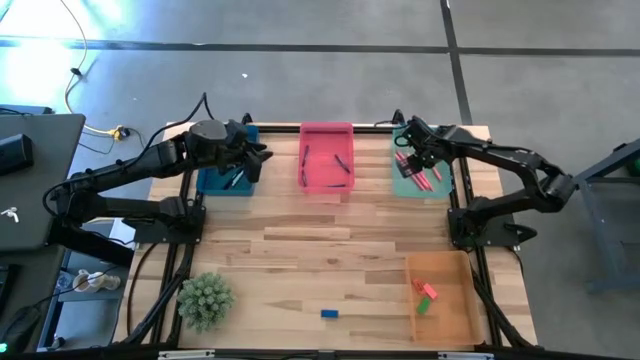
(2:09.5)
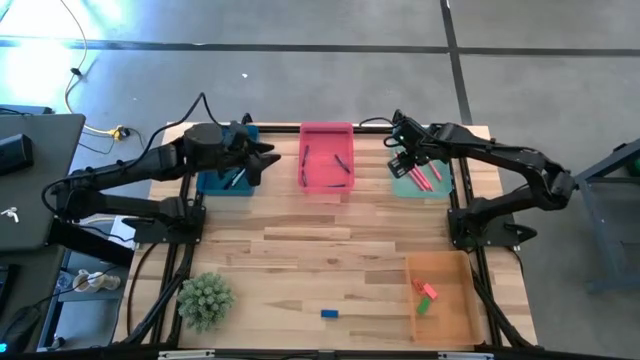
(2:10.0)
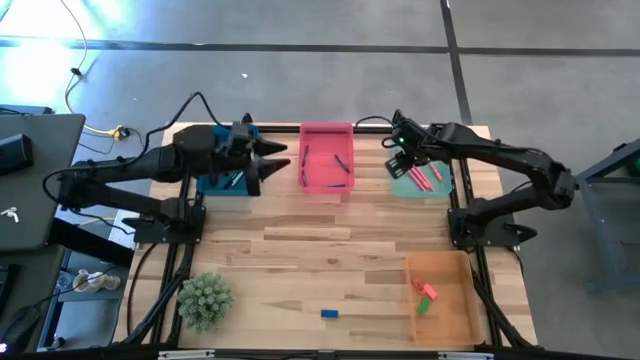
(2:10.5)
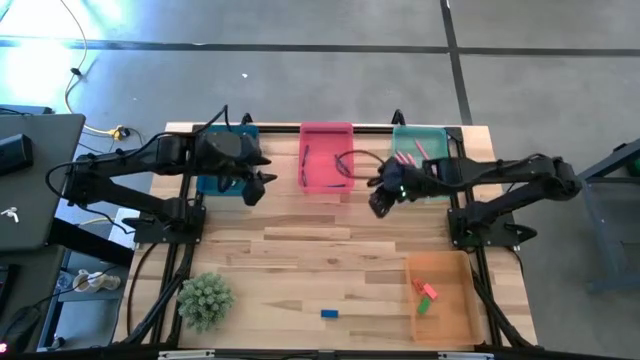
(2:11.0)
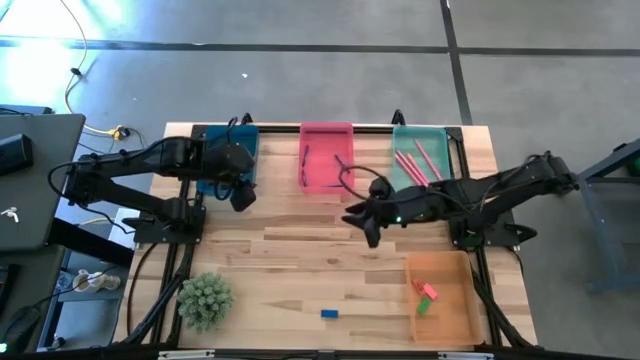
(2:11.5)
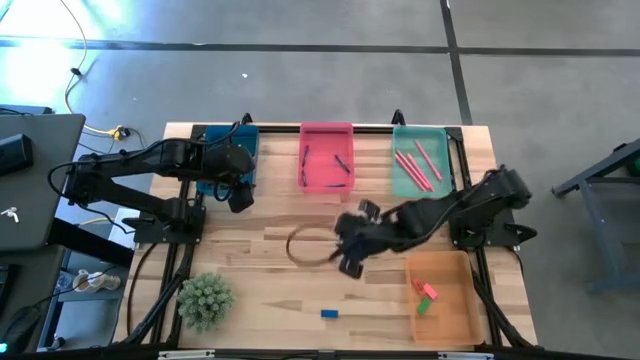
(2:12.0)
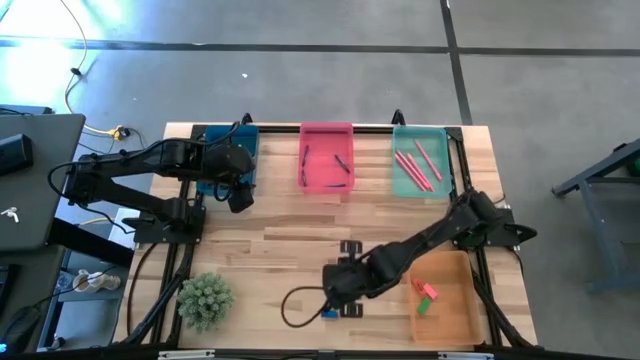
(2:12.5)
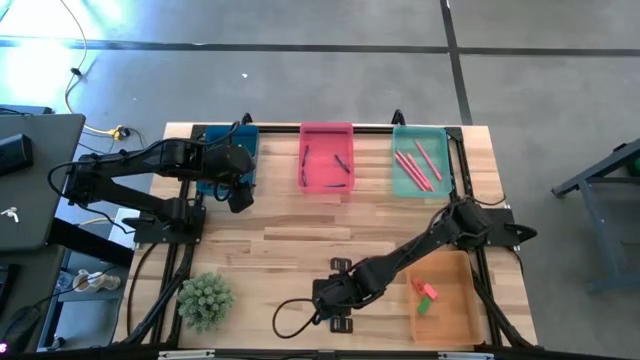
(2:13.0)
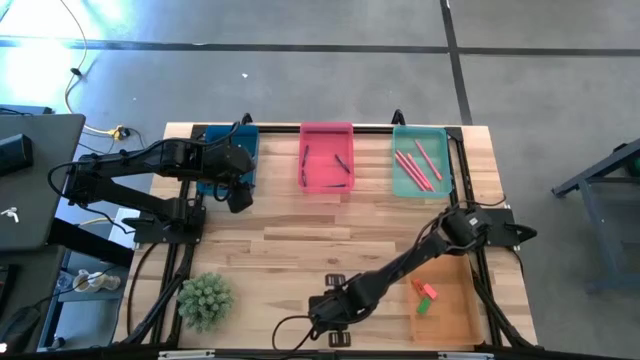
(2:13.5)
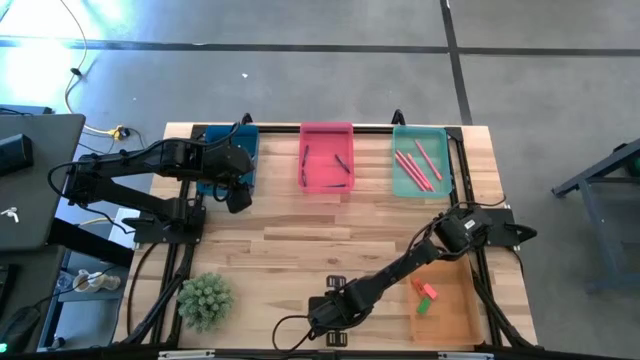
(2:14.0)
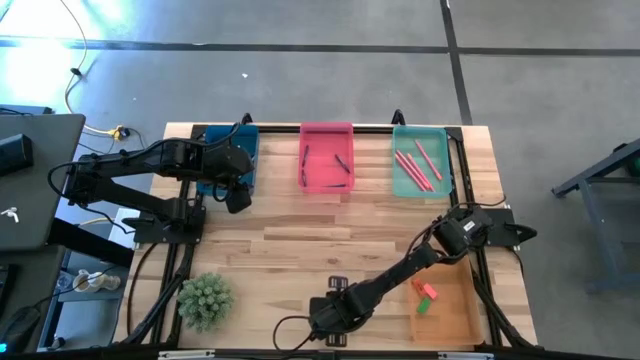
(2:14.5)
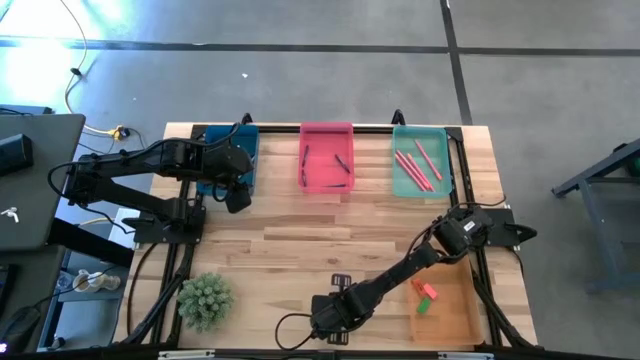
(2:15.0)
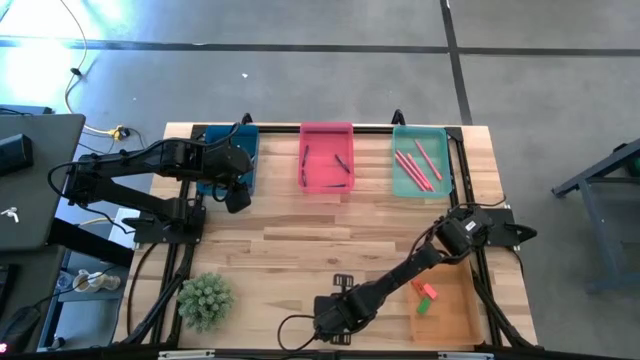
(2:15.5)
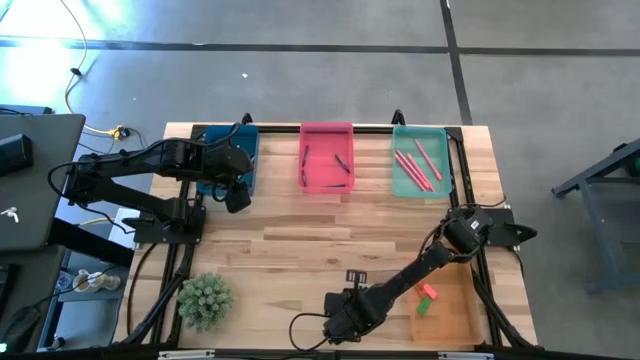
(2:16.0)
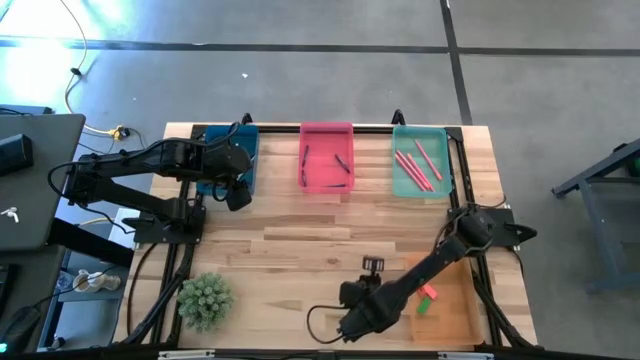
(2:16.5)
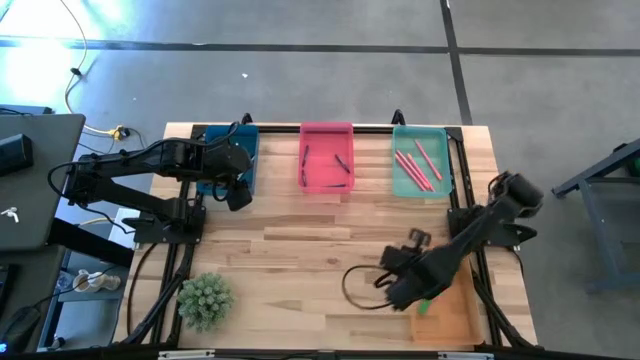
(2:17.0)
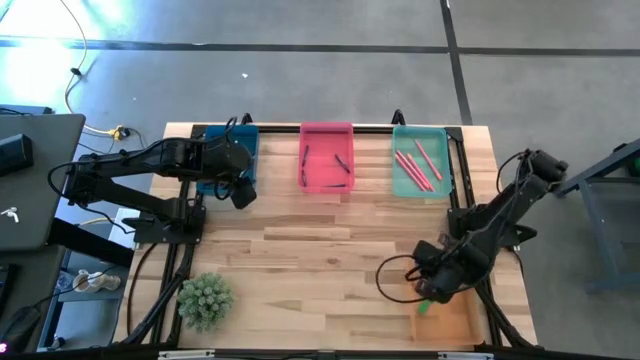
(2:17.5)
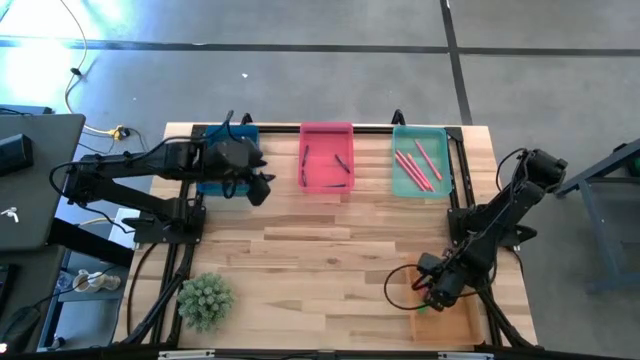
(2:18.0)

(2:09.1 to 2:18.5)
Task: Sort crayons/erasers/pens/pencils in bins
Put the blue eraser into the orange bin

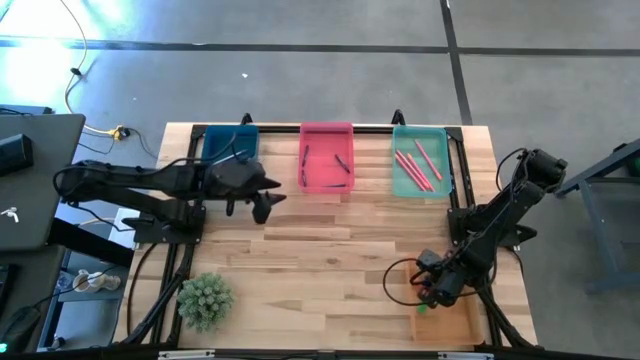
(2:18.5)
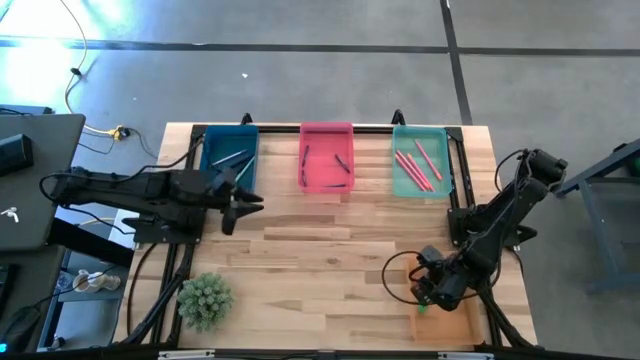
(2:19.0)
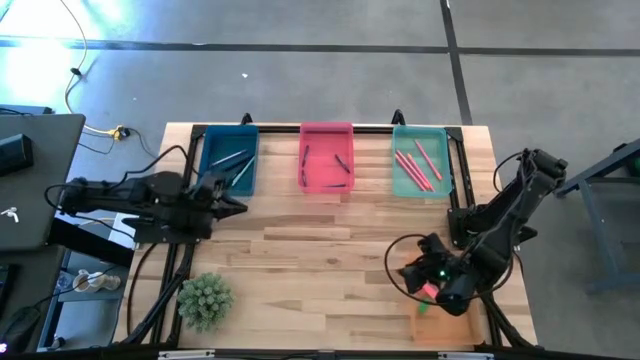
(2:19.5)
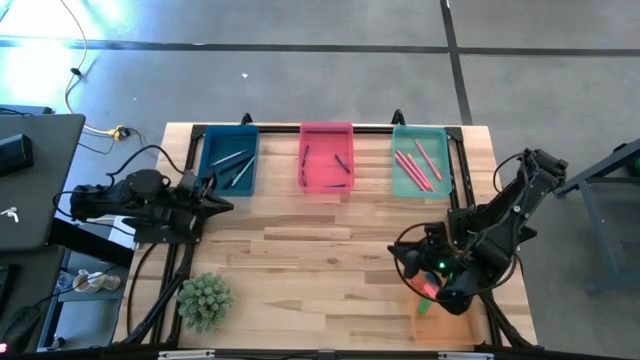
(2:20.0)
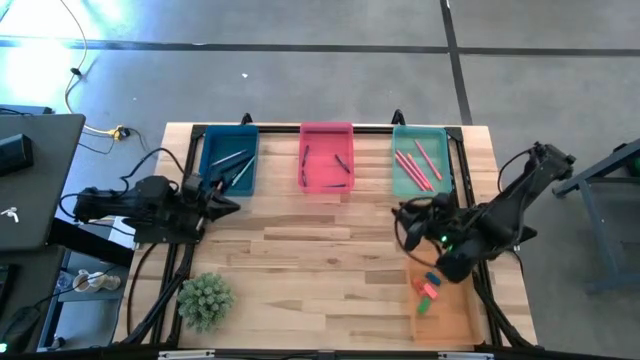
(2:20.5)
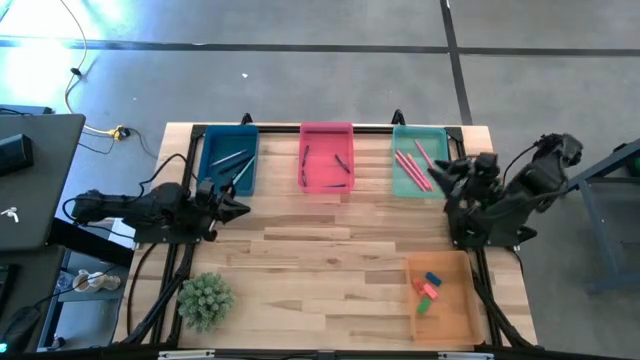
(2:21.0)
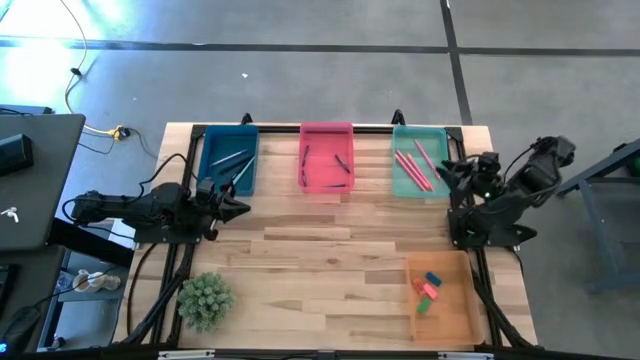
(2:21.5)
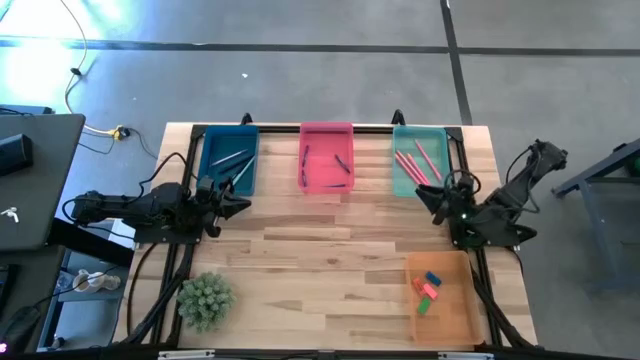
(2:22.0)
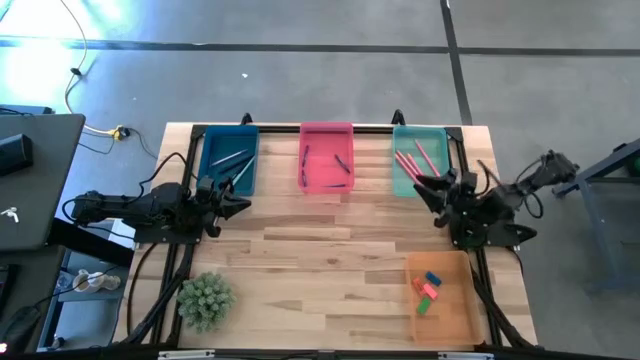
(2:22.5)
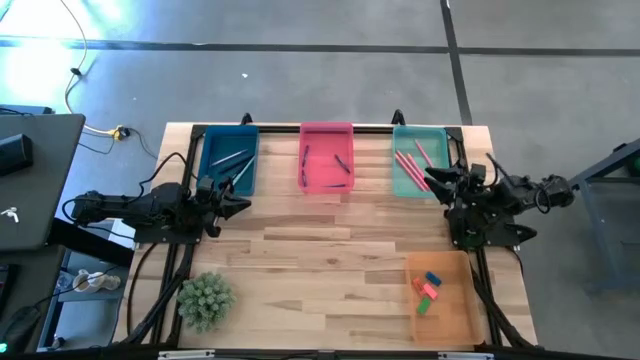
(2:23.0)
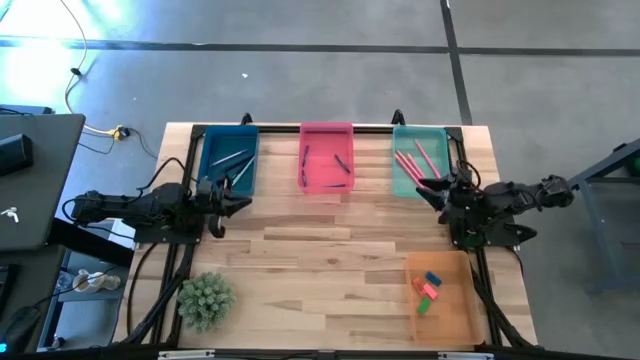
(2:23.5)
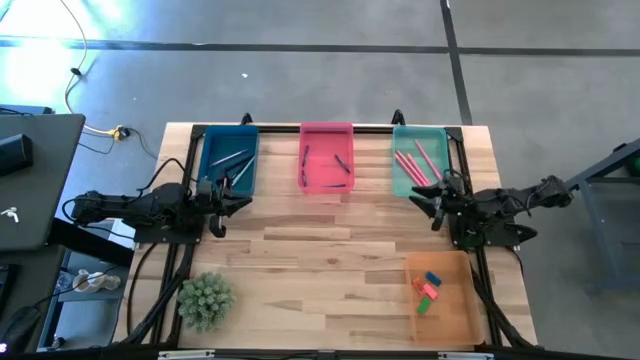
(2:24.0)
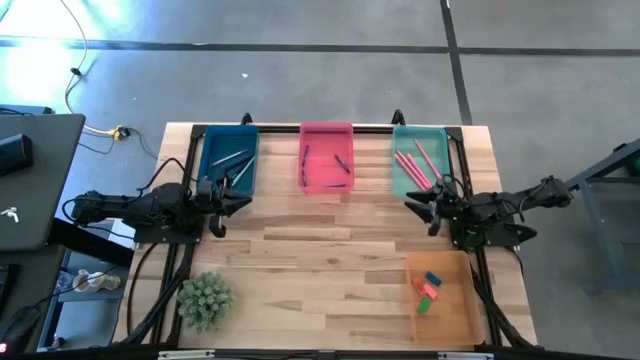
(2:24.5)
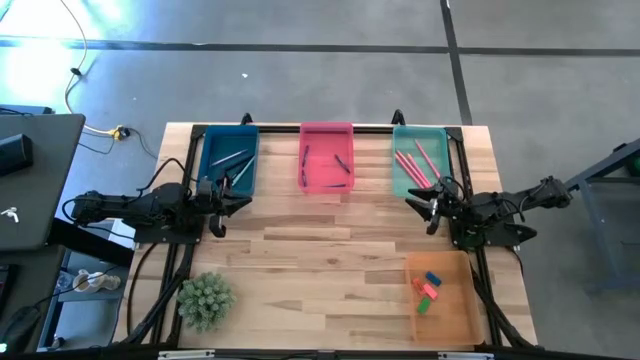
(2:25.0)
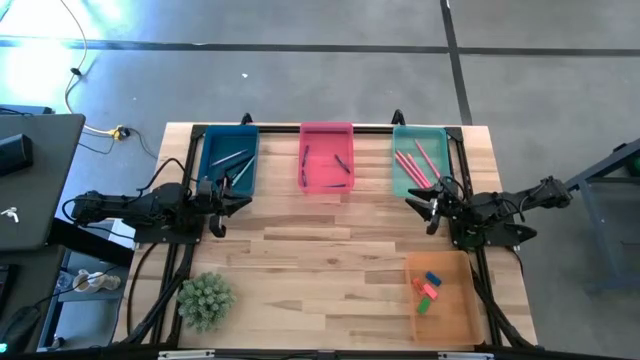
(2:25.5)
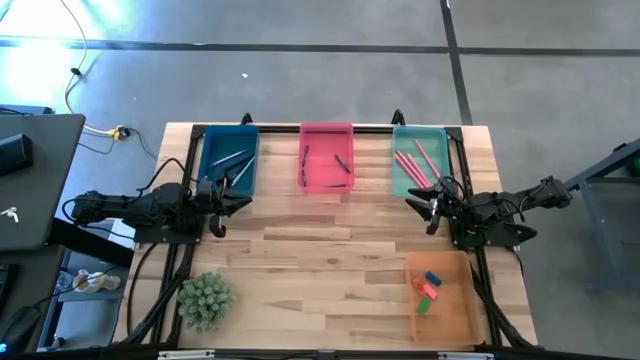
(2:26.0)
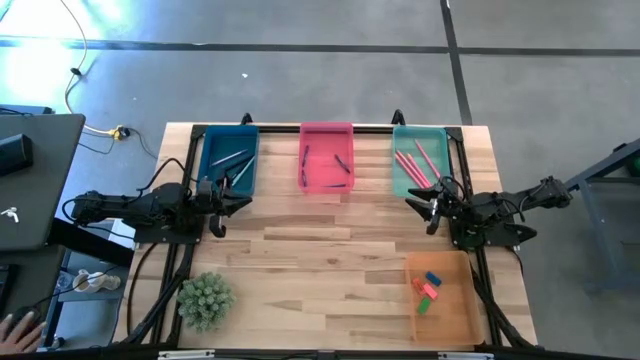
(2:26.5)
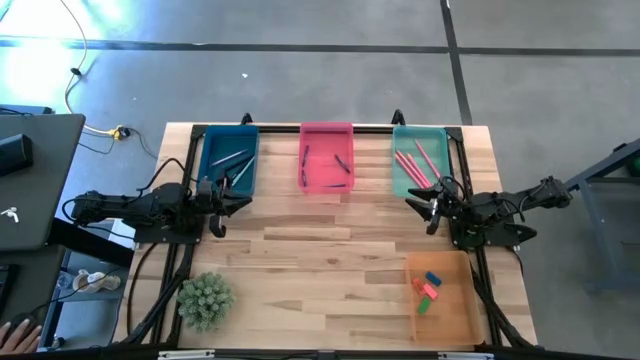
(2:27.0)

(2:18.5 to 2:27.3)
Return to Home Position

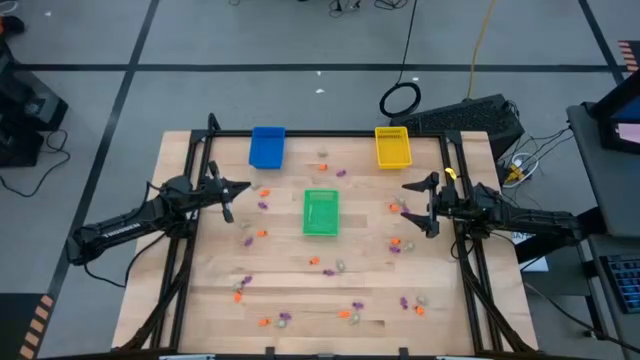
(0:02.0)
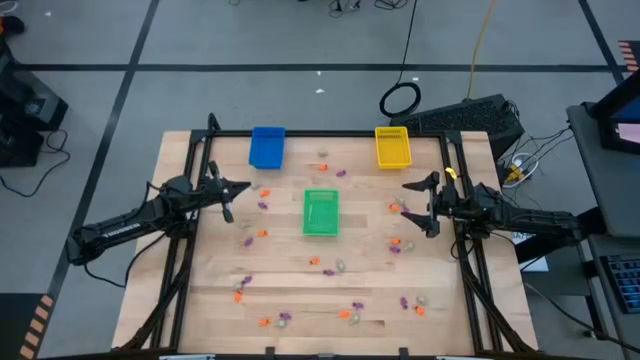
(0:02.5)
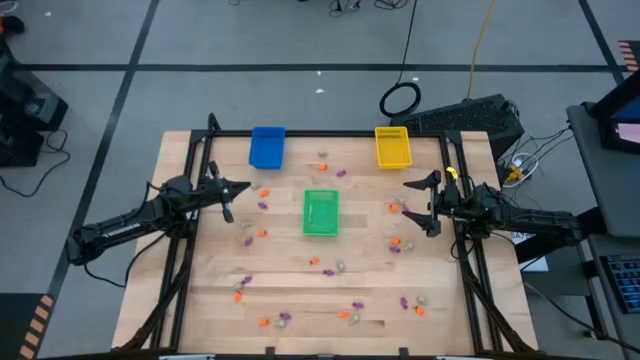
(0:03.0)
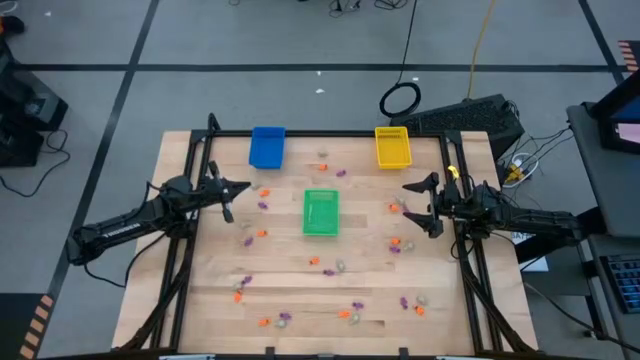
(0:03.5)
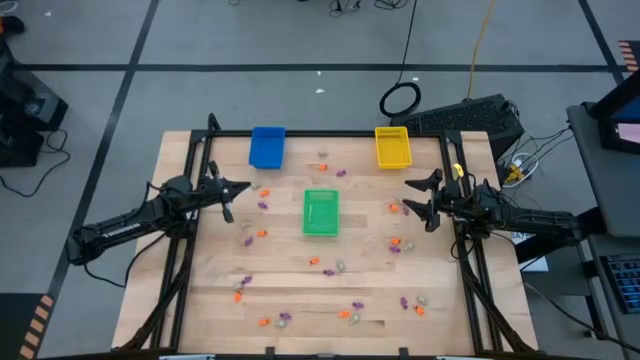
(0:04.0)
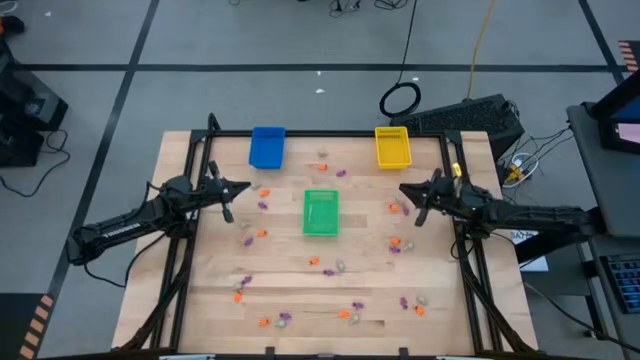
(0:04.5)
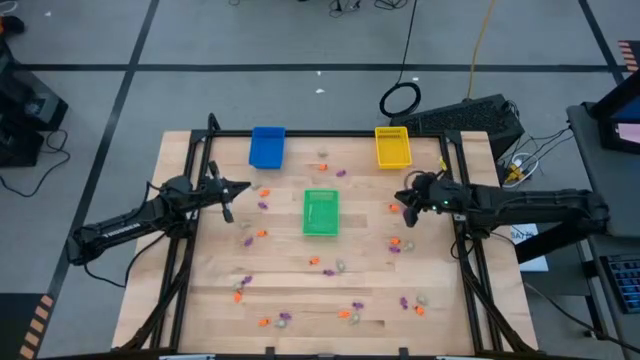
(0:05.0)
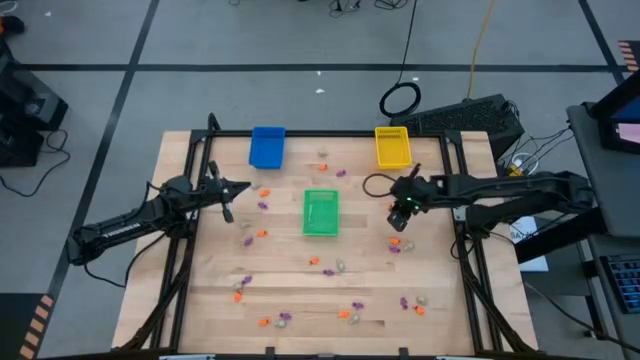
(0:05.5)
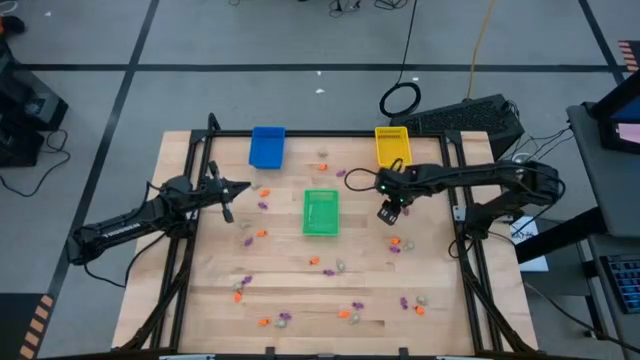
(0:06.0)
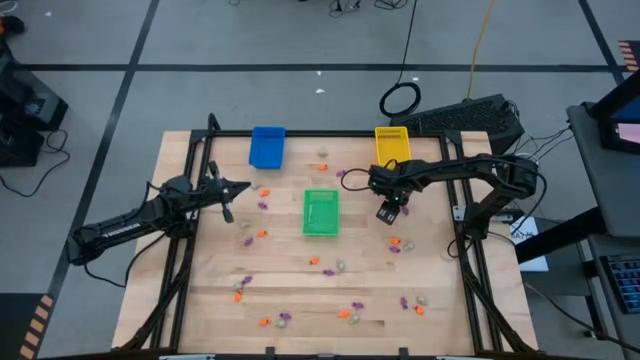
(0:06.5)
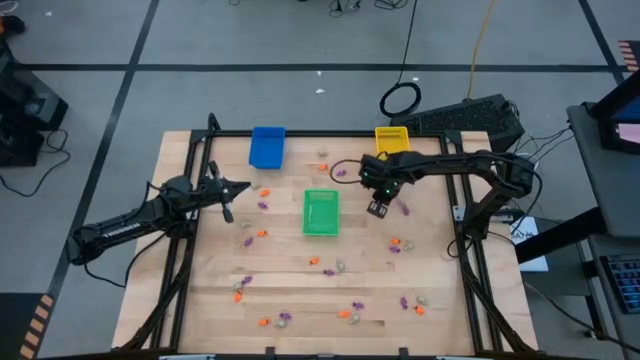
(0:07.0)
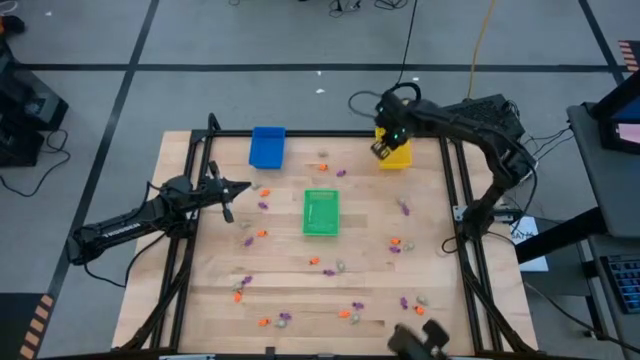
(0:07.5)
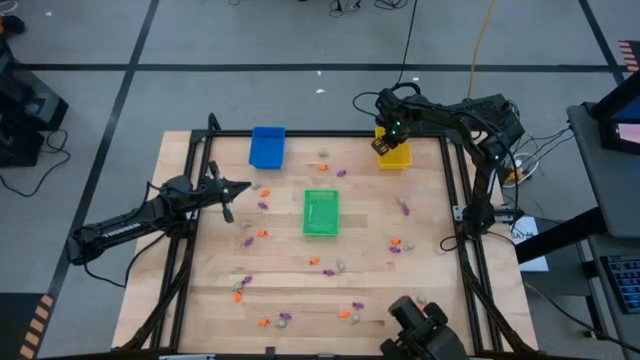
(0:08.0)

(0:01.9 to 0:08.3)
Task: Sort Halloween decoration
Put the orange skeleton toy into the yellow bin
